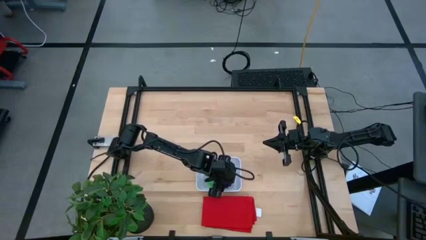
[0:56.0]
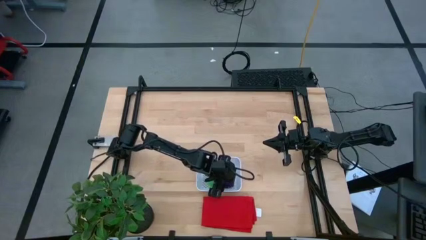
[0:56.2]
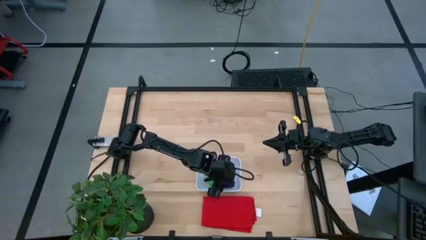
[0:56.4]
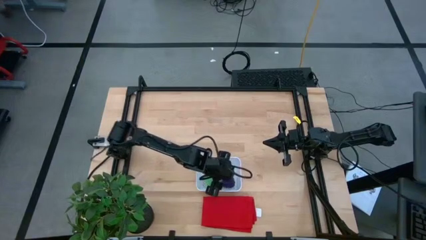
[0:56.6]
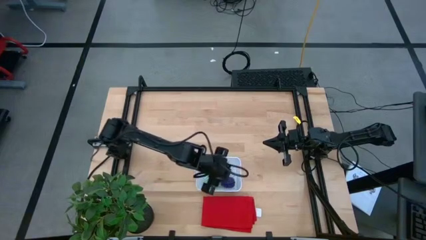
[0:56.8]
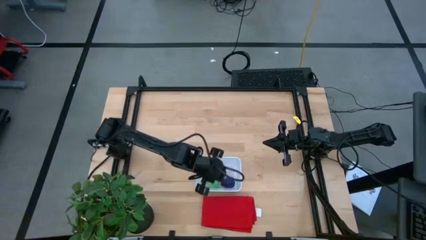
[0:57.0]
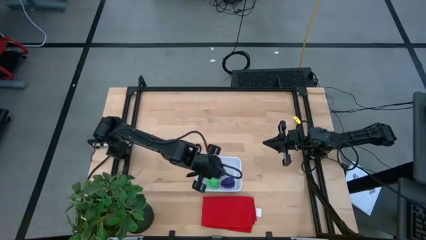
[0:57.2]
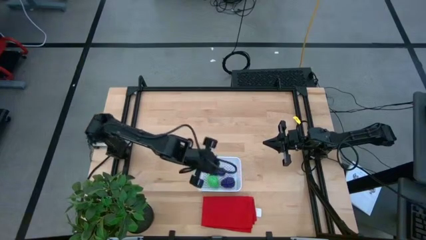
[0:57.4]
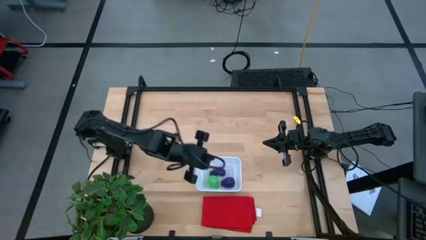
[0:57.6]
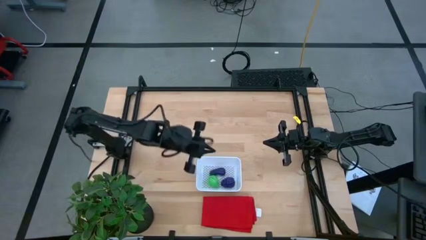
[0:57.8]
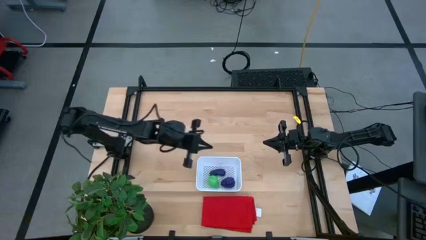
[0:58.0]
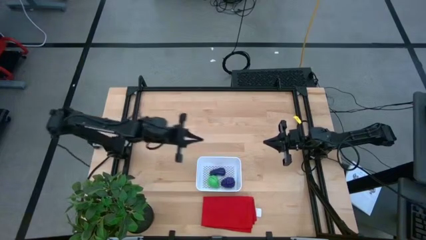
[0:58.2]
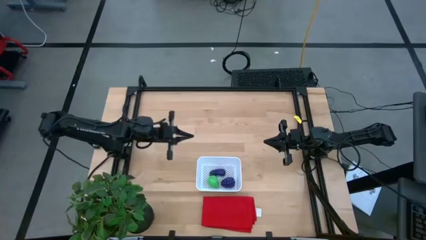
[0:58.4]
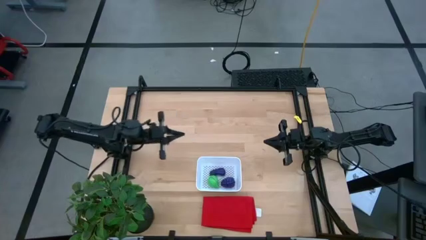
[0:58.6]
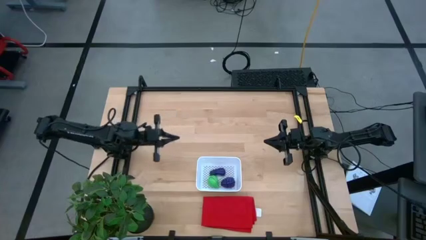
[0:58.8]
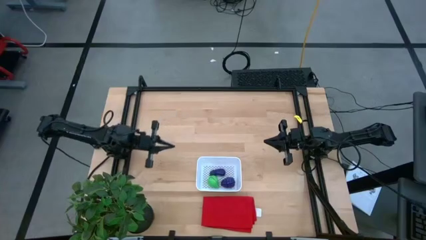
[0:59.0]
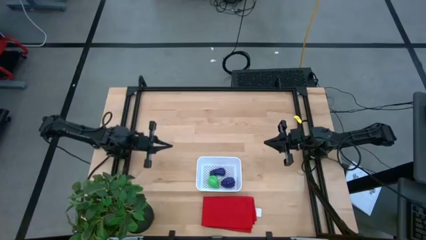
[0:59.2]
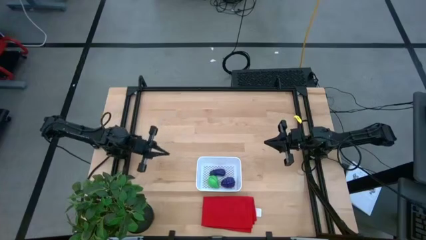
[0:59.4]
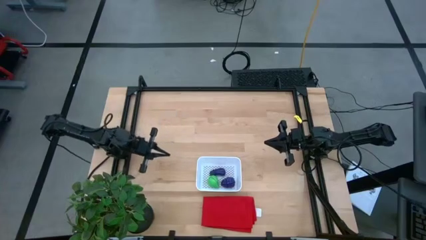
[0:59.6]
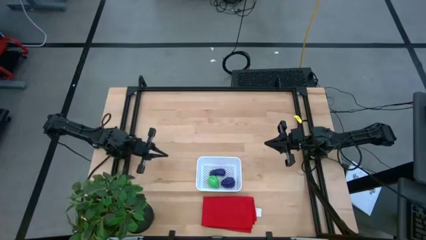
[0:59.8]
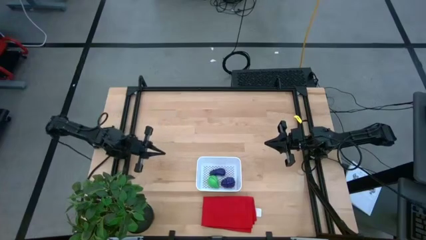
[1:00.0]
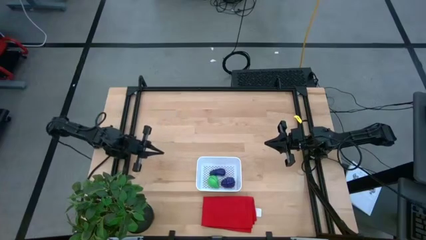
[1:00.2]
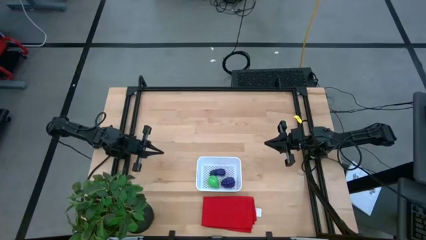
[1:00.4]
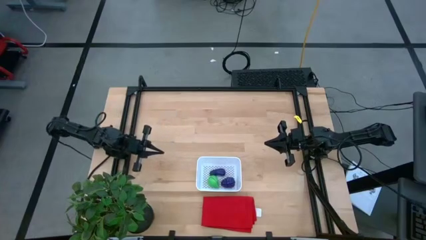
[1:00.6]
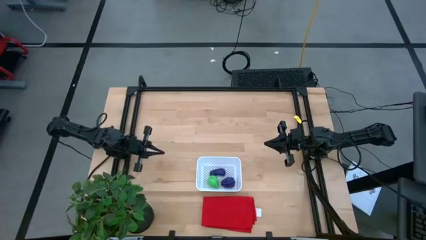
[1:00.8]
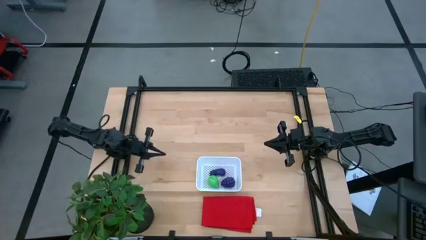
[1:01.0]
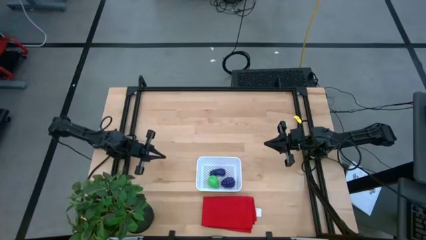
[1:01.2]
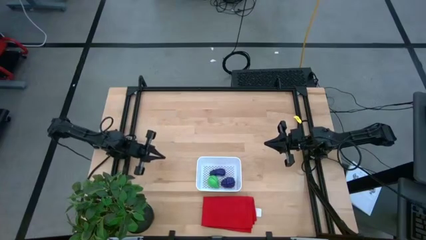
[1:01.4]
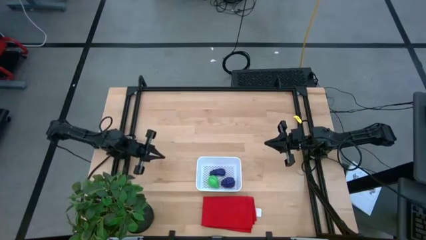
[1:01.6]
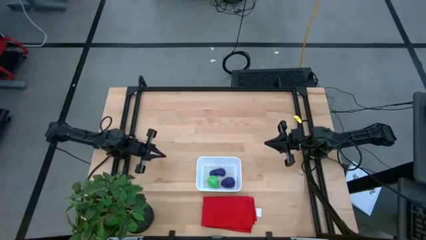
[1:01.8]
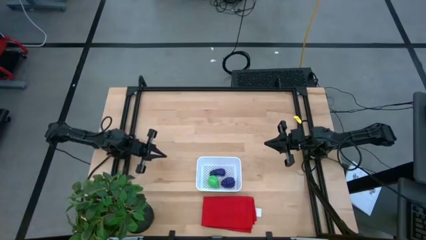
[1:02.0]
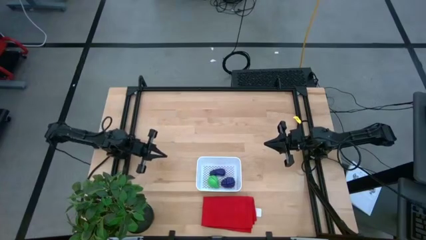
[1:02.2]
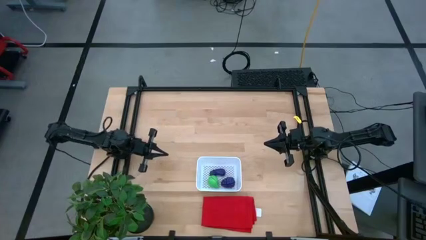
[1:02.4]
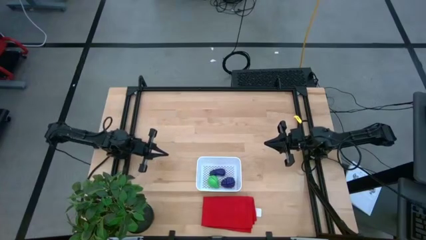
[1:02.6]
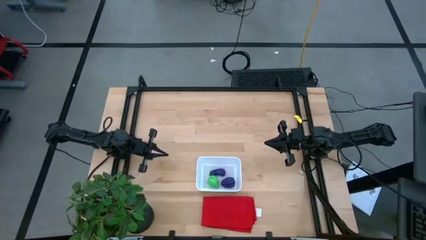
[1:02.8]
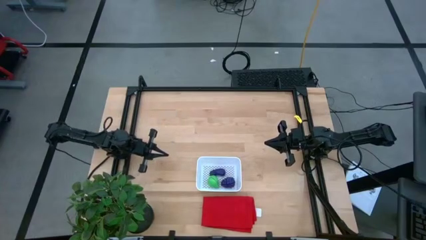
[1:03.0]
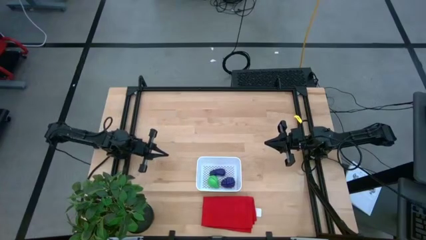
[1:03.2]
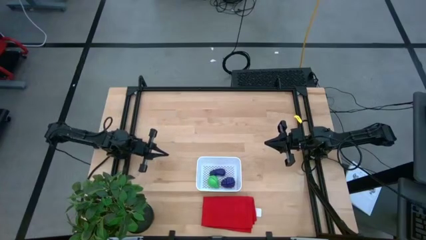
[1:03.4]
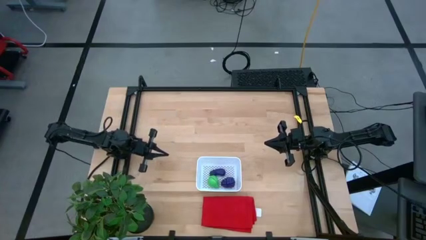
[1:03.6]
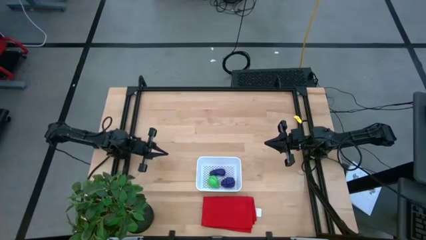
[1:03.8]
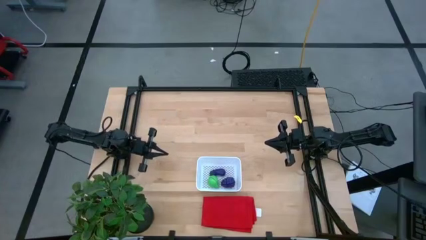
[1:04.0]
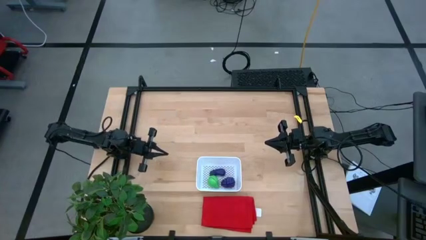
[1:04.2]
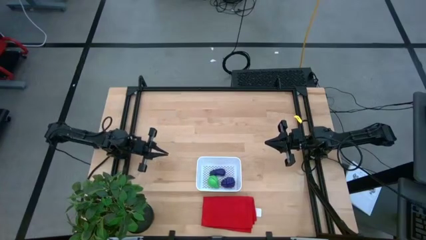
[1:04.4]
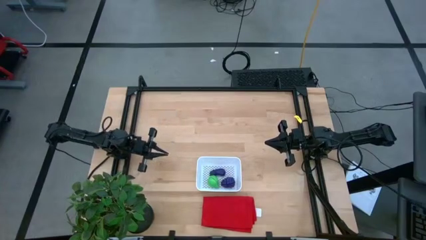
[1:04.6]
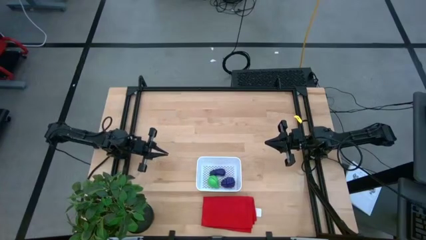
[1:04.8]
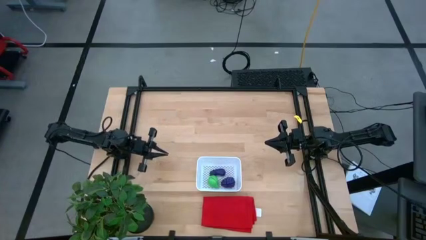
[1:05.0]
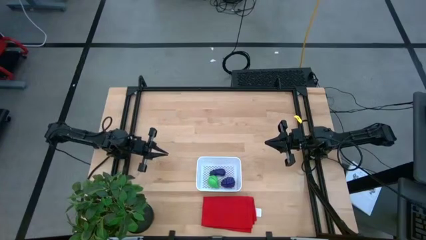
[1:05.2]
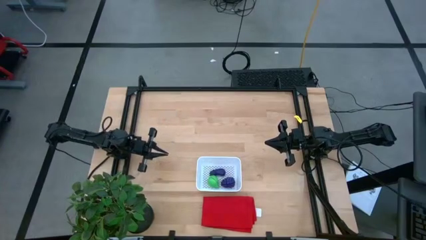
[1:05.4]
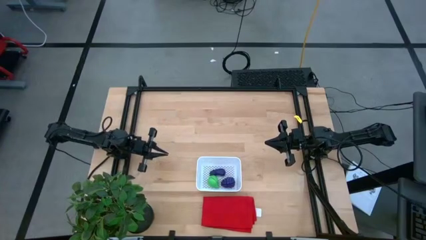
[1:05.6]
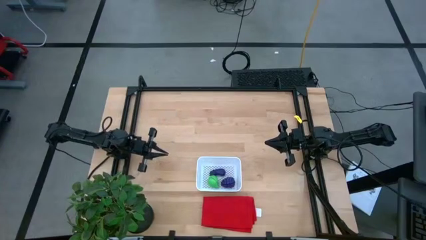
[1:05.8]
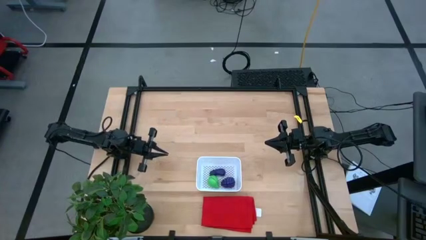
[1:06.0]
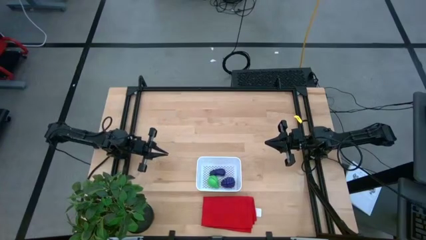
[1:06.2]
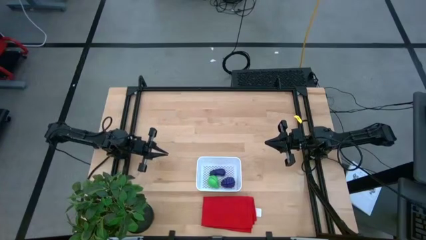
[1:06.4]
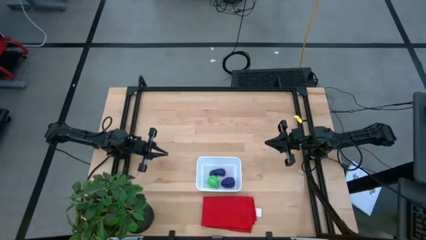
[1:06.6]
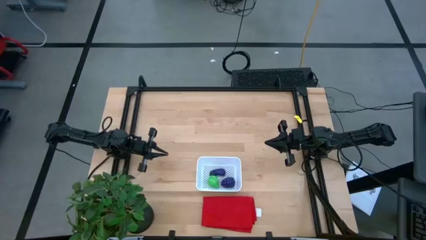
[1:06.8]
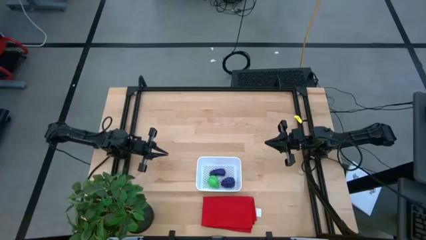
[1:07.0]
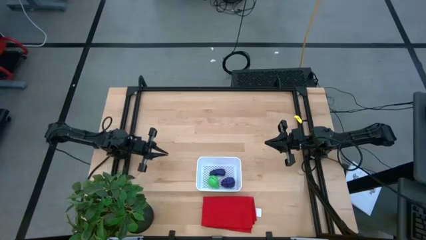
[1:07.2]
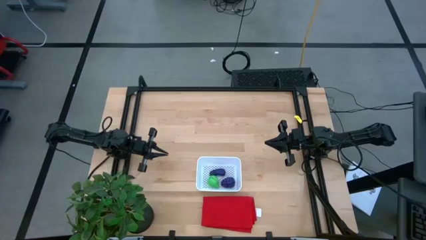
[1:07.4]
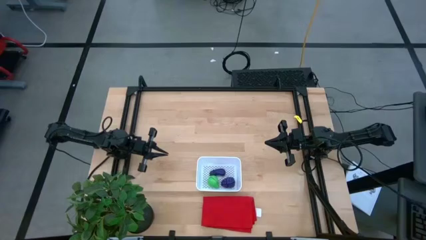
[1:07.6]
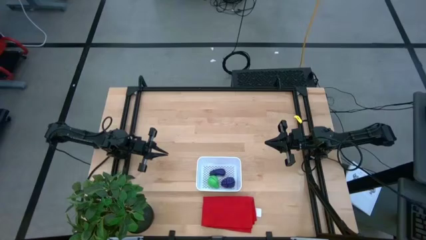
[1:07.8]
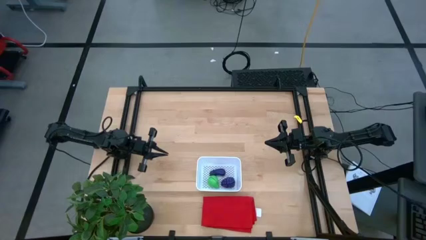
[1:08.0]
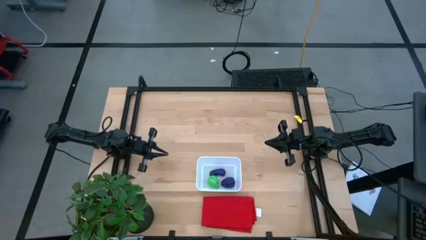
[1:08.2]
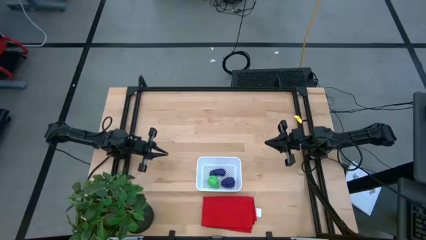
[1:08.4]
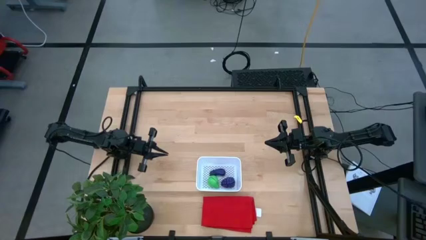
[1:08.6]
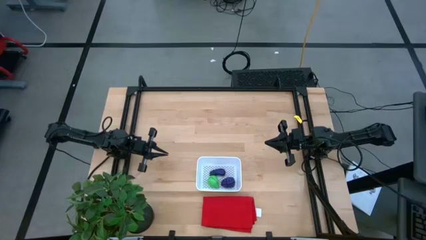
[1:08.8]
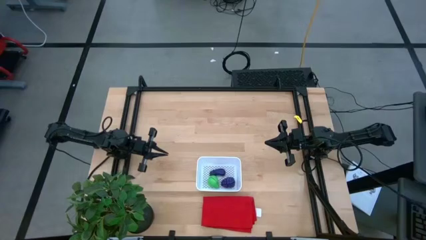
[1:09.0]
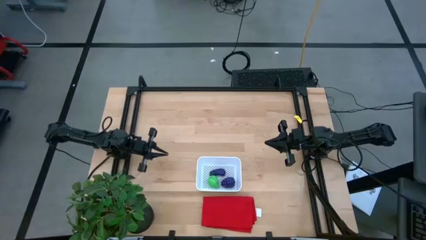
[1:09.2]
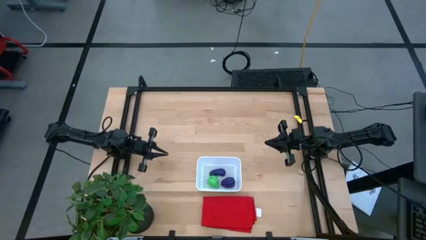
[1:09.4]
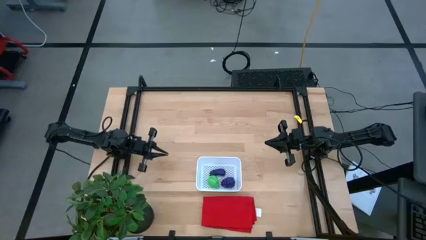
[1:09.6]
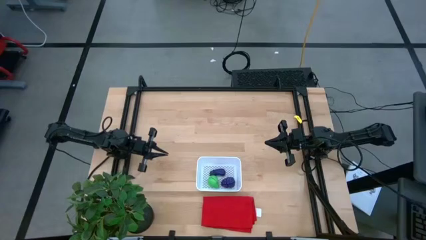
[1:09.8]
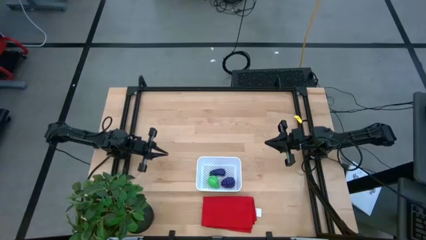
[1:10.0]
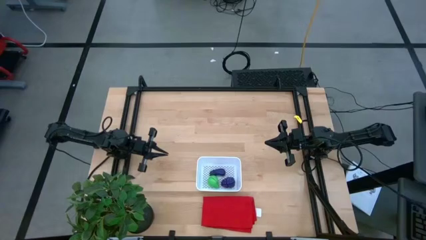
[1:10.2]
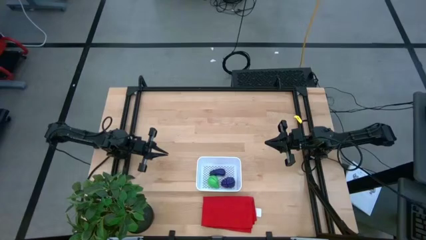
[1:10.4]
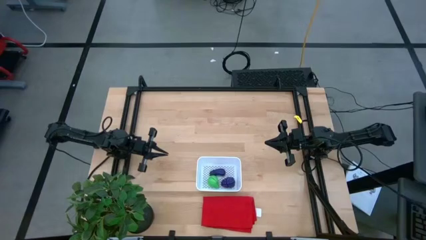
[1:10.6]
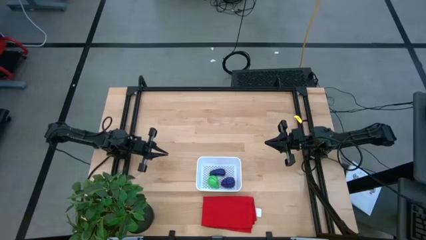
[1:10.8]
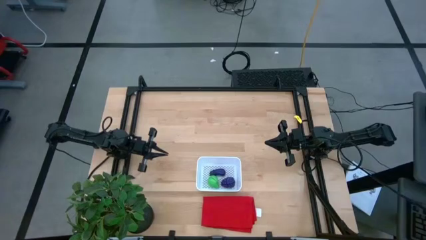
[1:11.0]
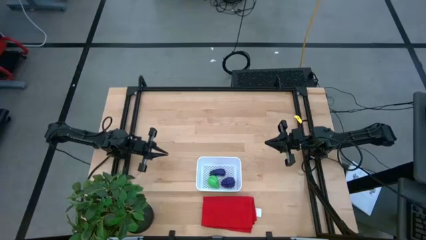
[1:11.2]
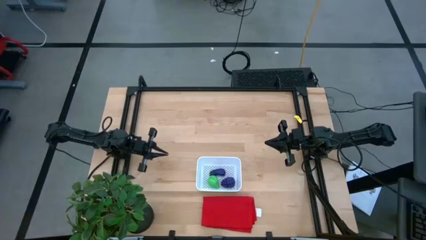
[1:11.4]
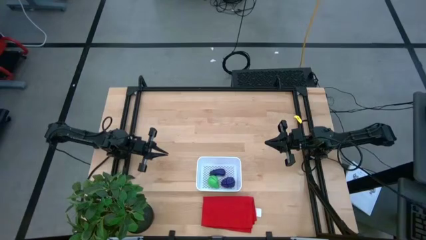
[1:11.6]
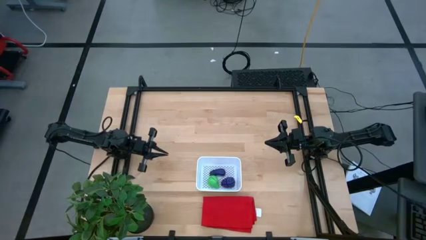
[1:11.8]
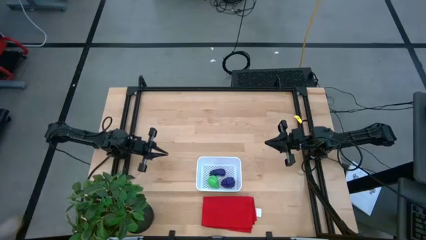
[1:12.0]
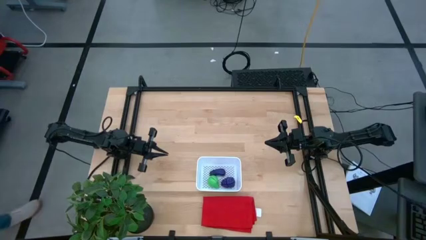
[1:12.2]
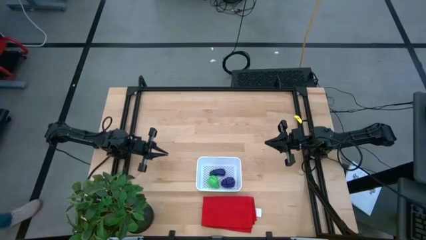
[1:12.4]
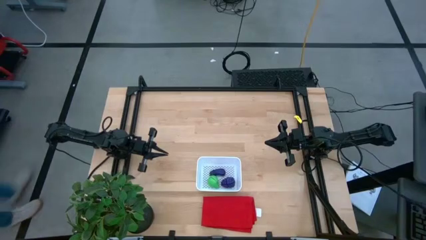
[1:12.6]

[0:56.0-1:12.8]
Task: Pick and placing Produce into tupperware
Return to Home Position

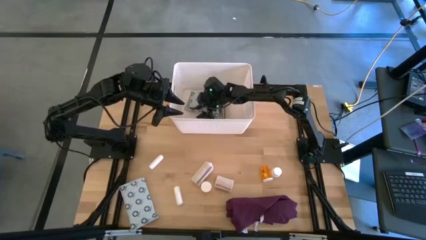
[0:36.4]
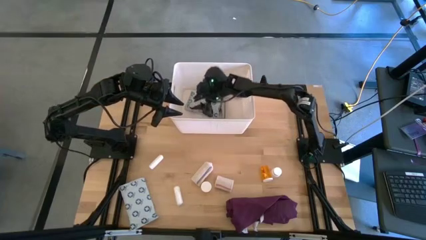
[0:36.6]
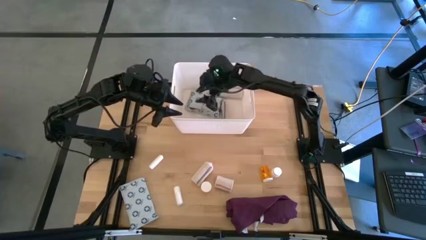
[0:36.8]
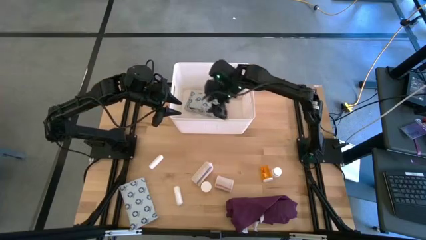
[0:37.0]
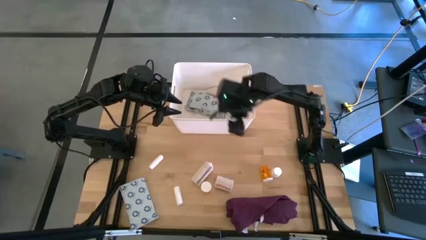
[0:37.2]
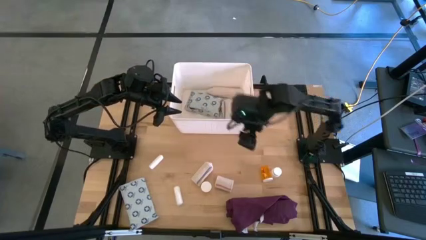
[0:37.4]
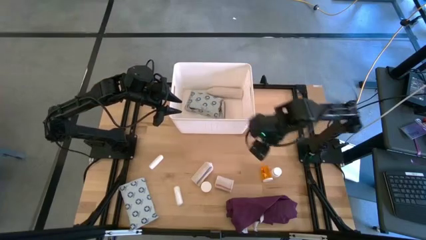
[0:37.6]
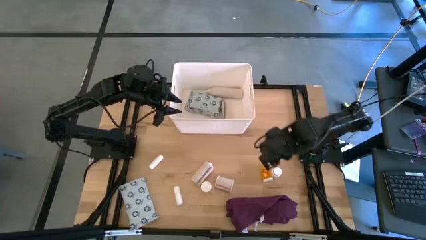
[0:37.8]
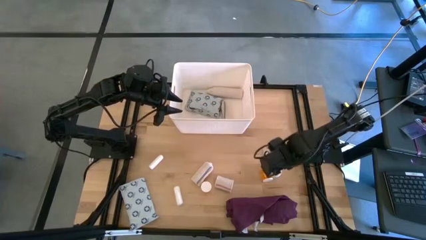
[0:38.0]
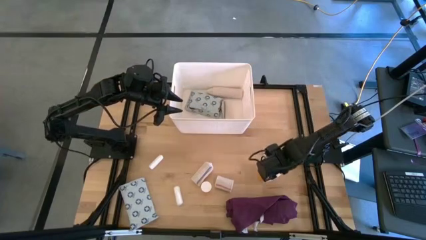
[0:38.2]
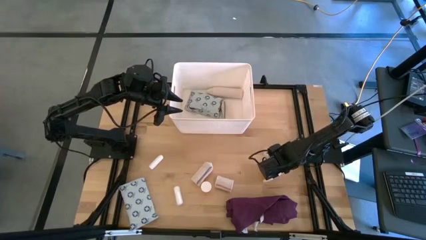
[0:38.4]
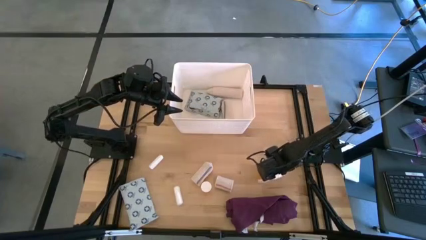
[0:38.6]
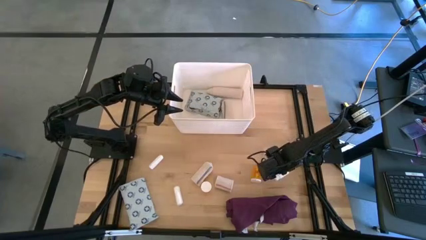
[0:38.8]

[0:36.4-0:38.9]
Task: Pick & place medical supplies in basket/bin
Put the white pill bottle into the white bin
